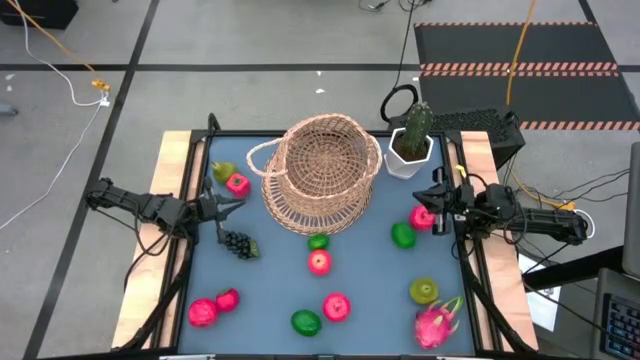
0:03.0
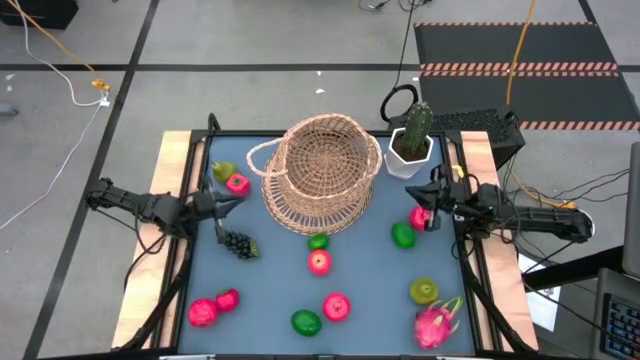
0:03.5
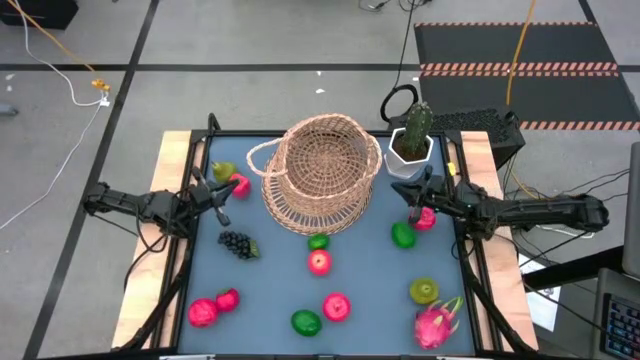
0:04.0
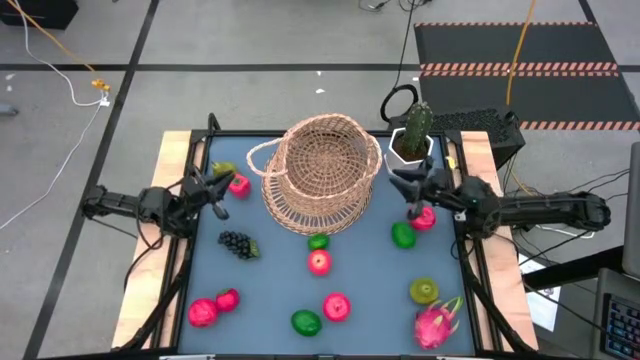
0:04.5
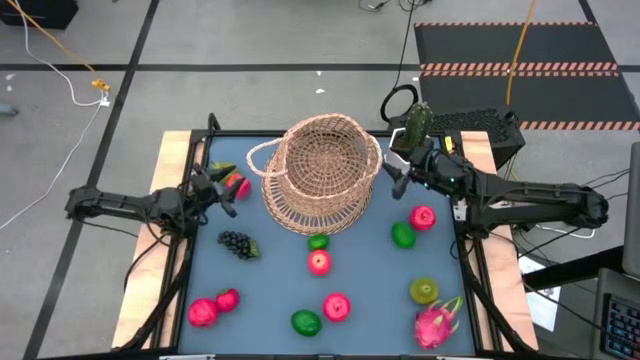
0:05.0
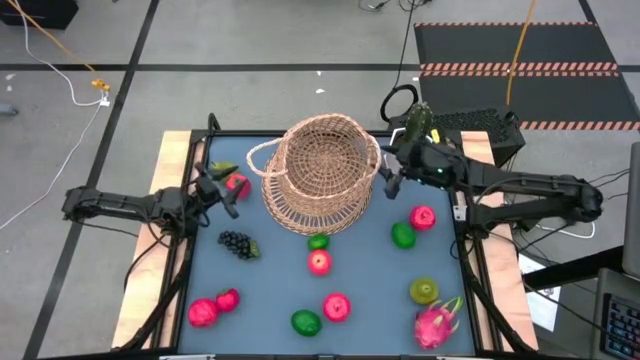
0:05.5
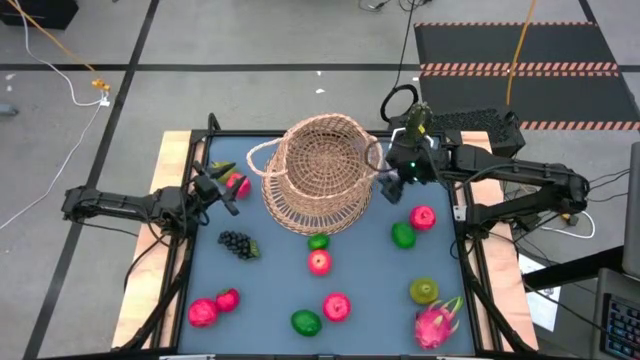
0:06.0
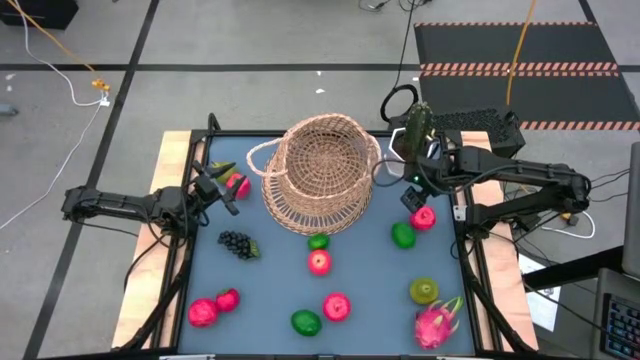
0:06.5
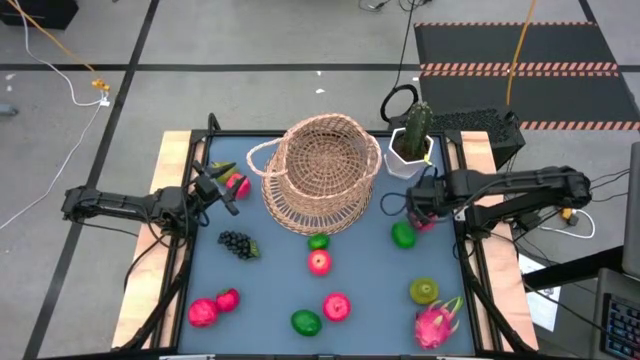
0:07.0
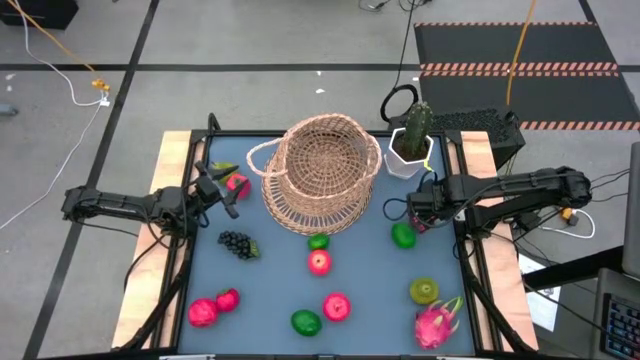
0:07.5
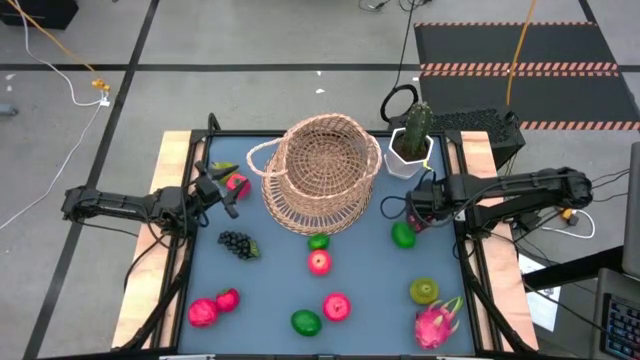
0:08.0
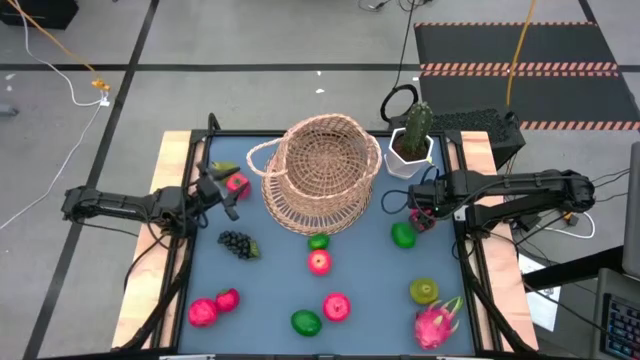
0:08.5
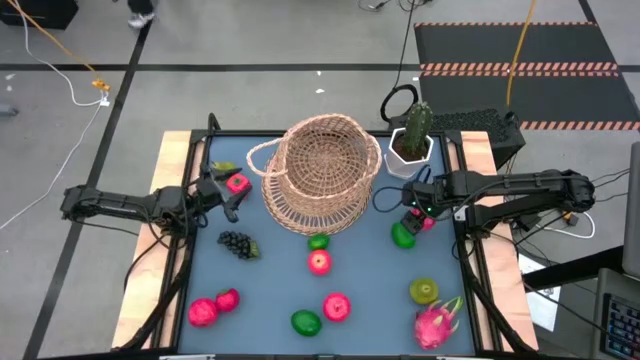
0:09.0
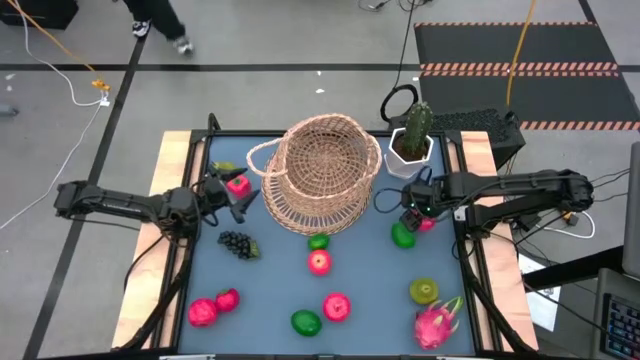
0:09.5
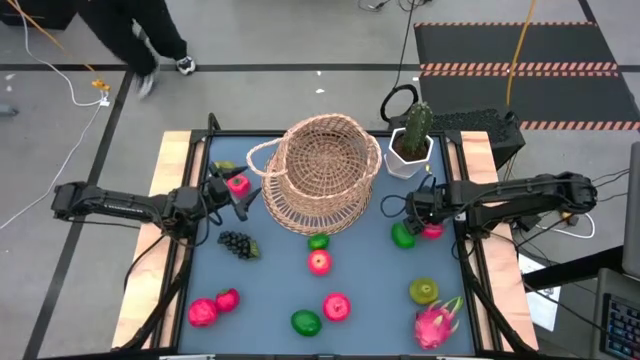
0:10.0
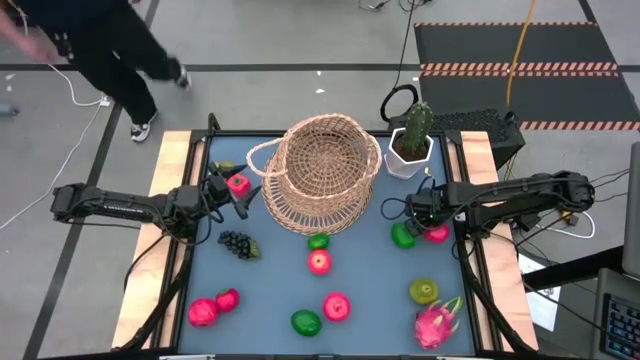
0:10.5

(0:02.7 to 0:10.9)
Task: Build produce basket
Put the apple into the basket

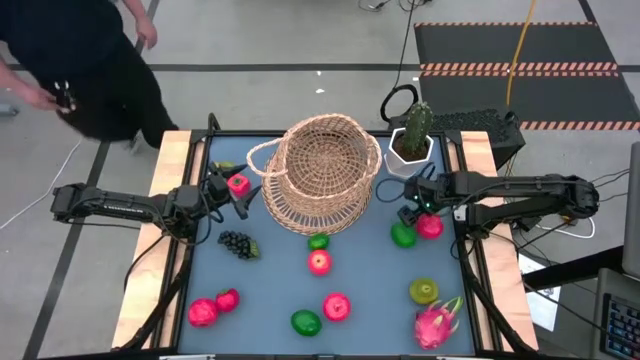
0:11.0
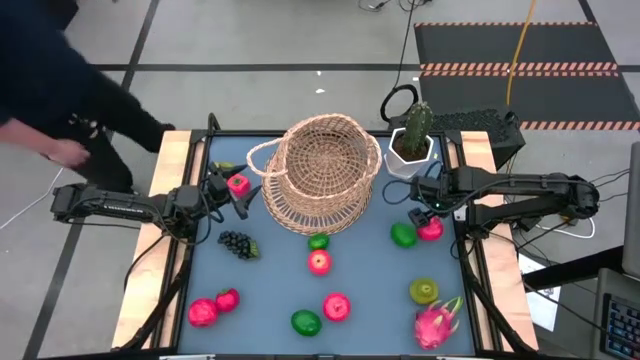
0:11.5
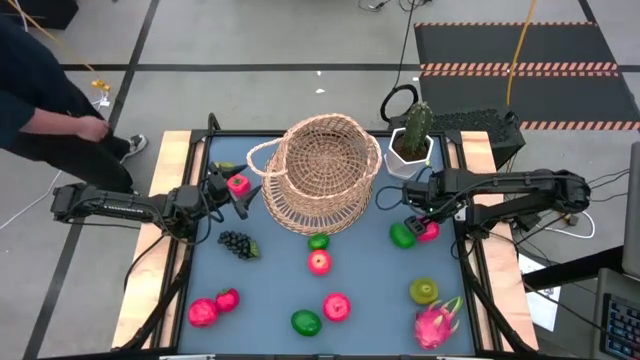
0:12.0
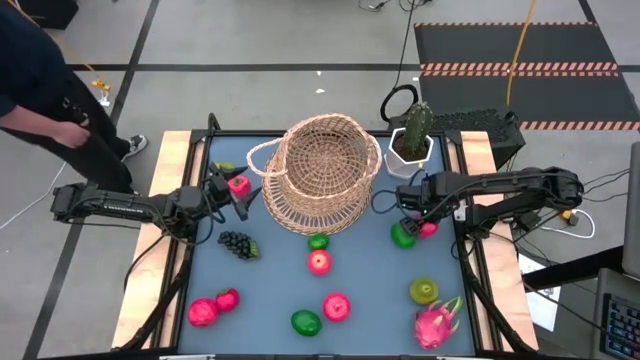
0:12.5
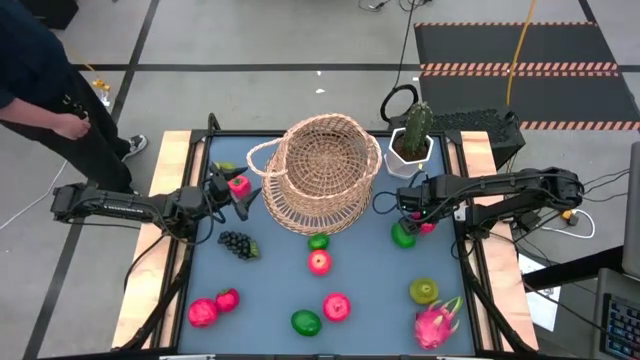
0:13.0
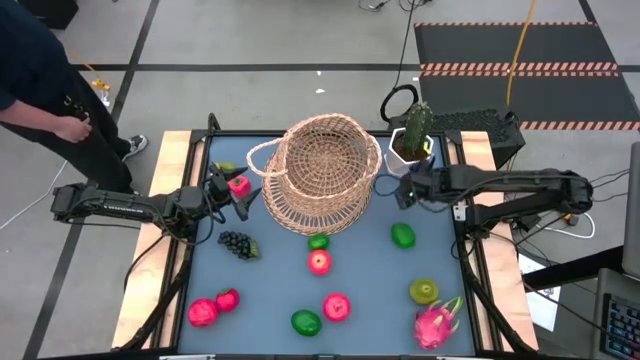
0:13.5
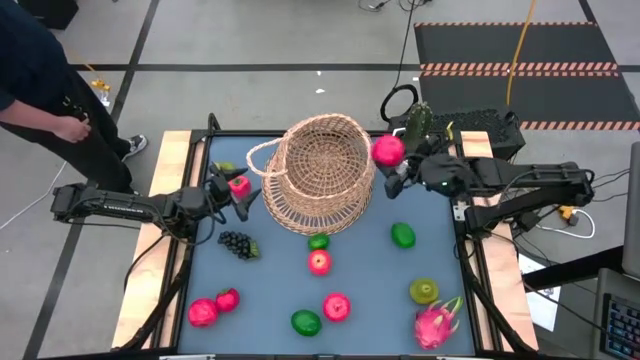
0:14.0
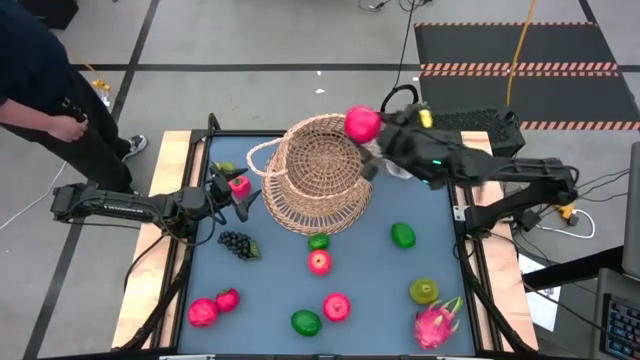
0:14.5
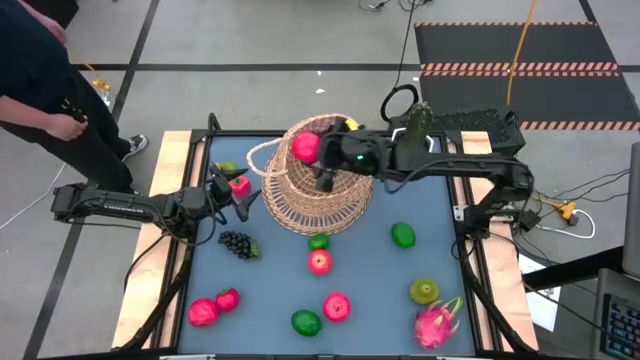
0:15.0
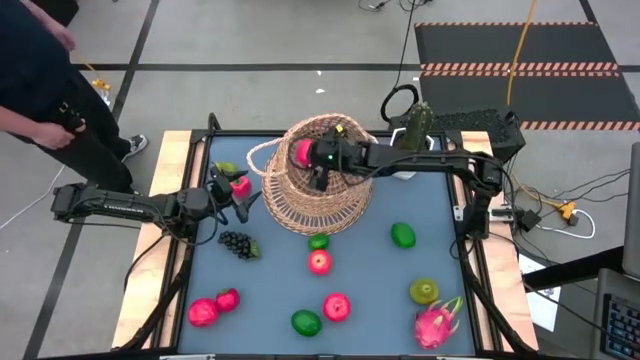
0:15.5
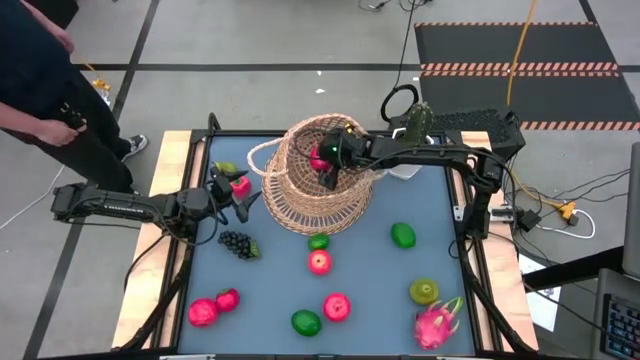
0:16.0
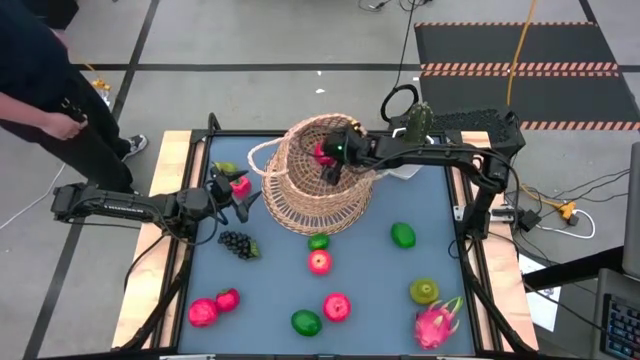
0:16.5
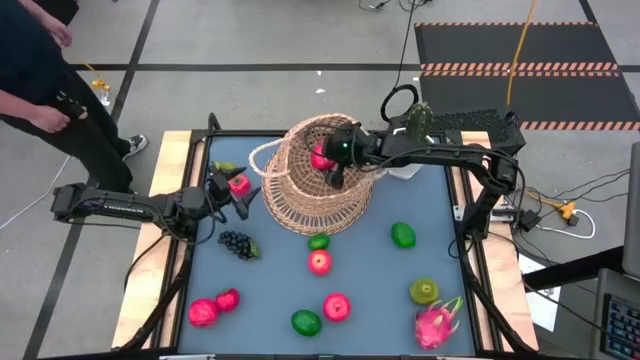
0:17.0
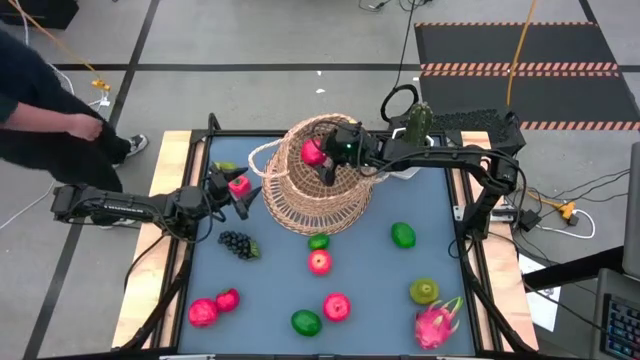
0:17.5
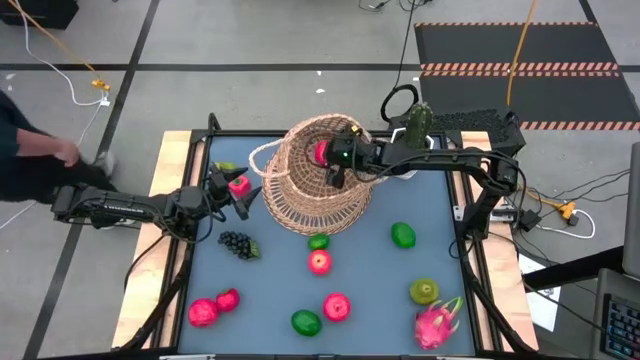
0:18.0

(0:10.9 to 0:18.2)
Put the apple into the basket

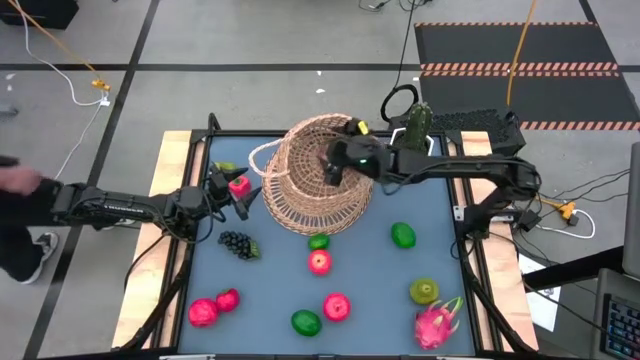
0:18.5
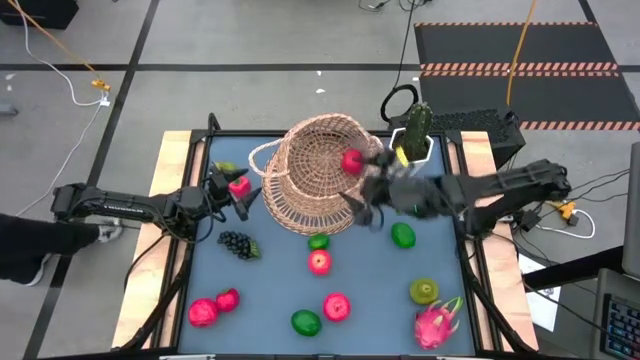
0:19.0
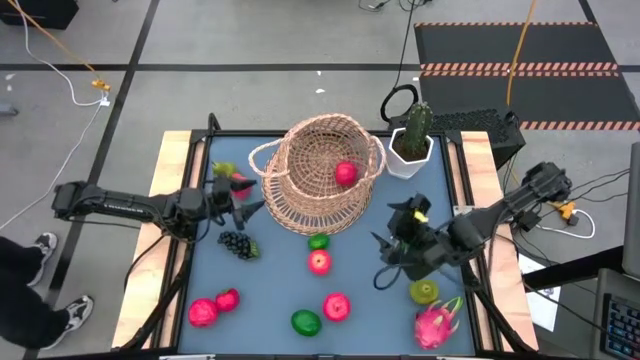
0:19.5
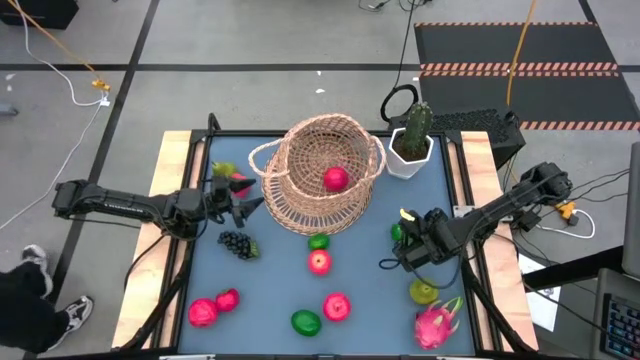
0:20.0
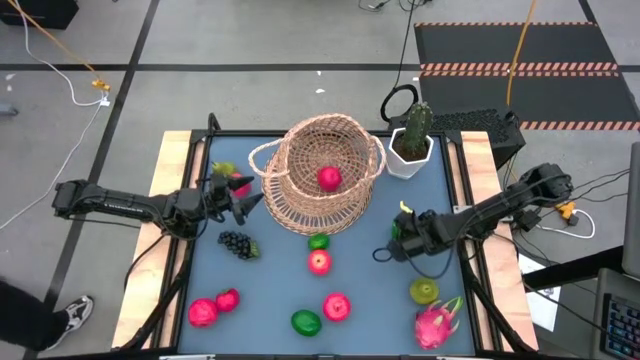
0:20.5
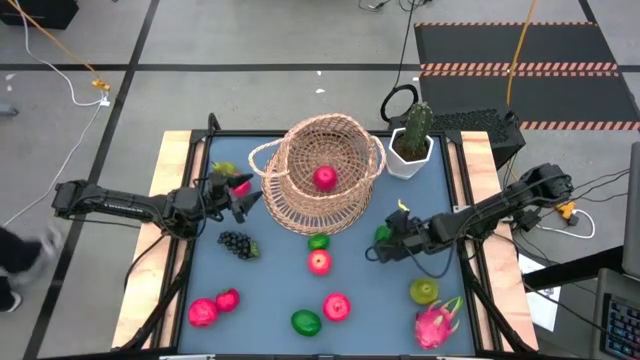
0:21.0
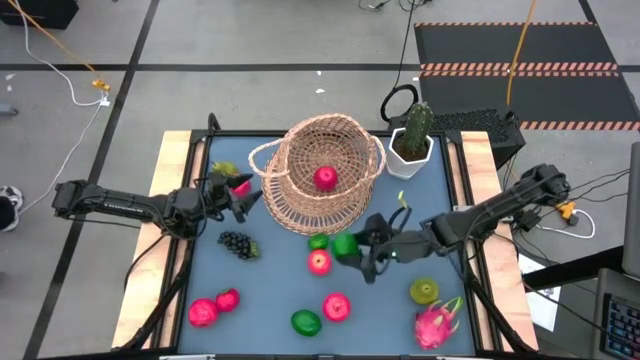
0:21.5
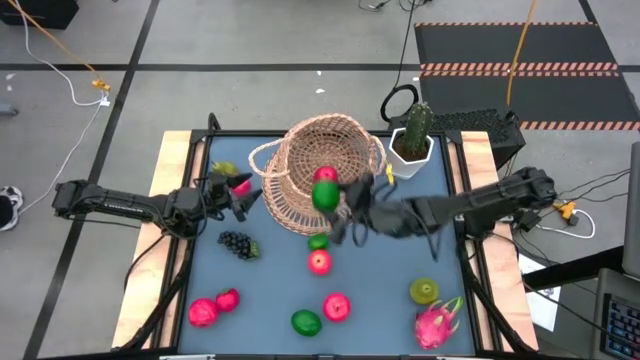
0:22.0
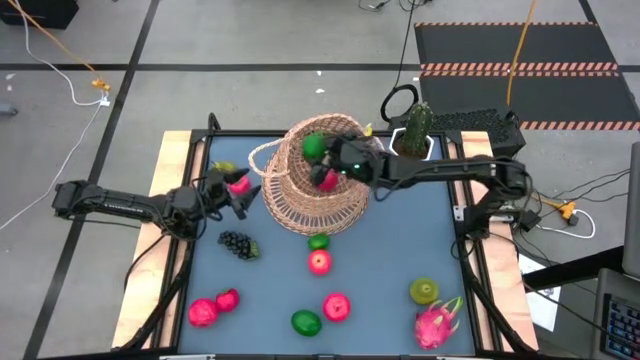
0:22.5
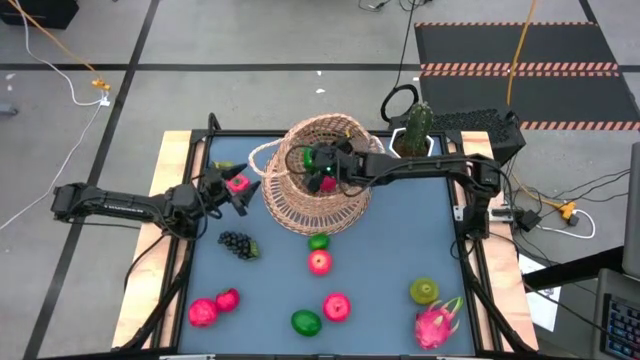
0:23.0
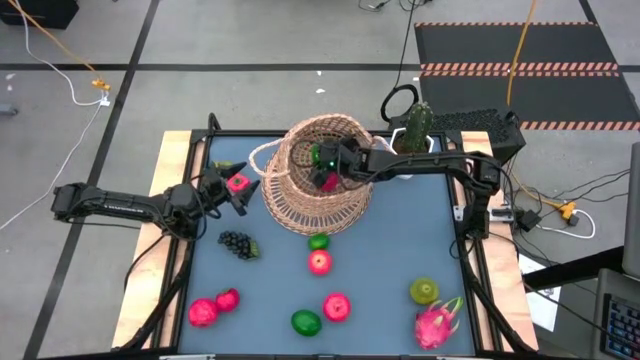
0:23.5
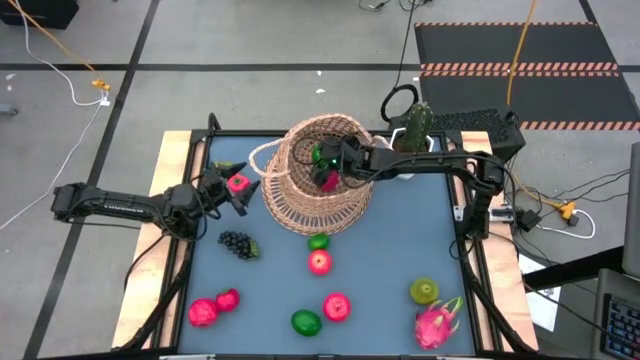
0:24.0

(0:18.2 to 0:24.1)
Put the top right lime into the basket
